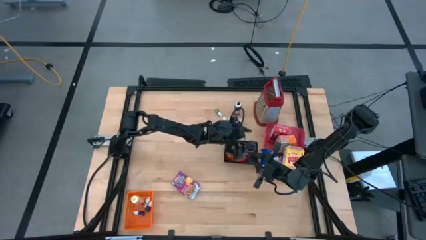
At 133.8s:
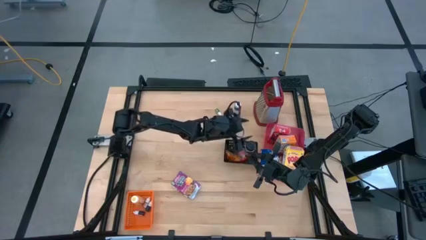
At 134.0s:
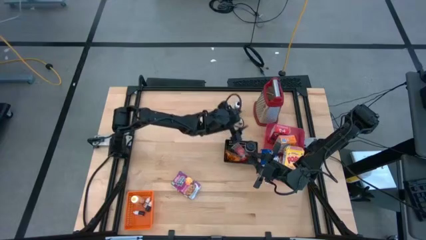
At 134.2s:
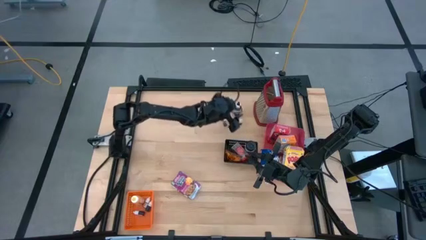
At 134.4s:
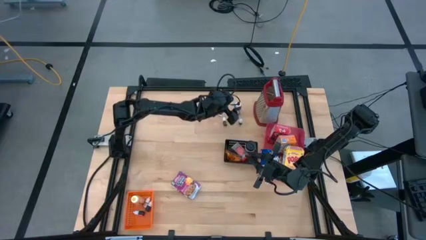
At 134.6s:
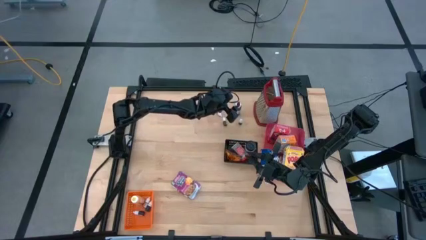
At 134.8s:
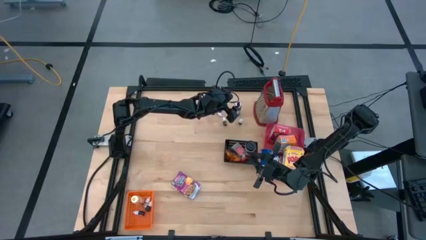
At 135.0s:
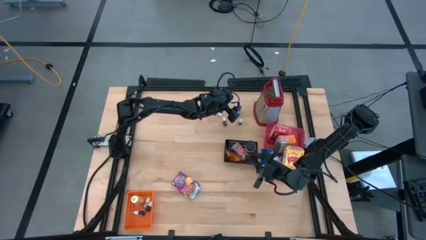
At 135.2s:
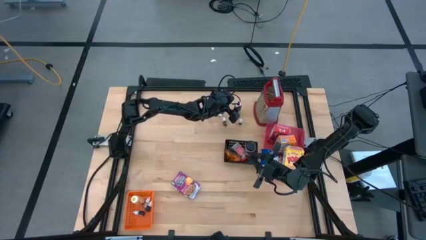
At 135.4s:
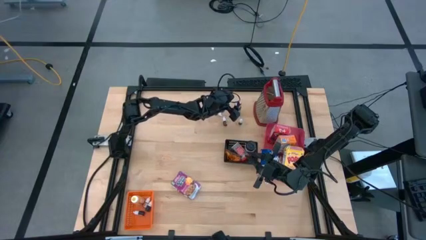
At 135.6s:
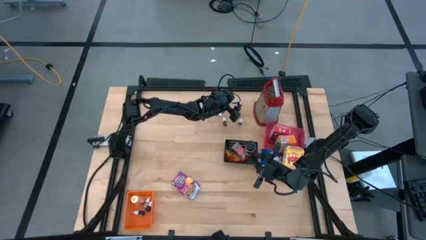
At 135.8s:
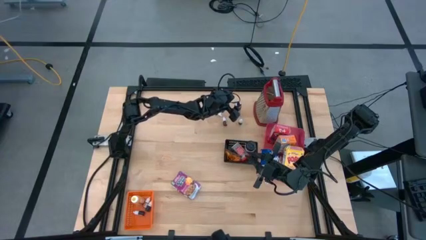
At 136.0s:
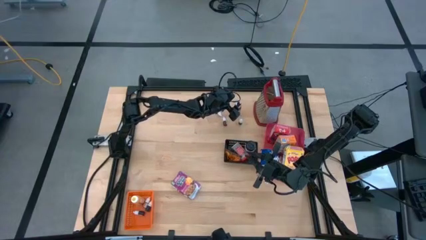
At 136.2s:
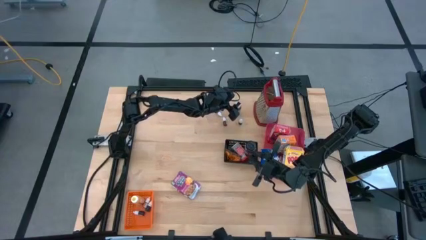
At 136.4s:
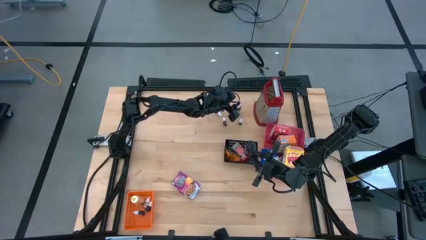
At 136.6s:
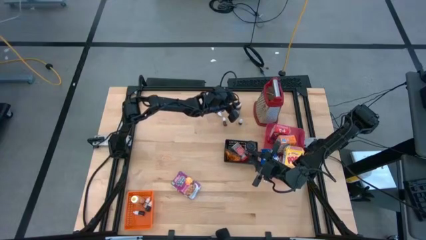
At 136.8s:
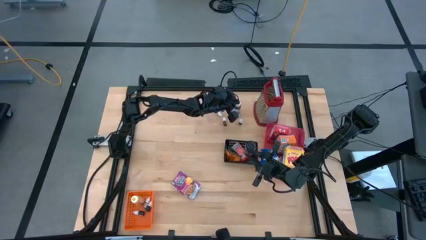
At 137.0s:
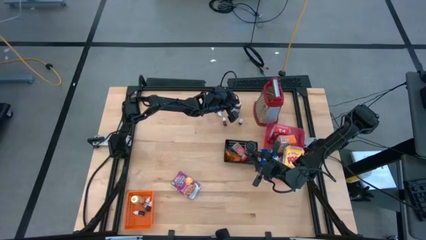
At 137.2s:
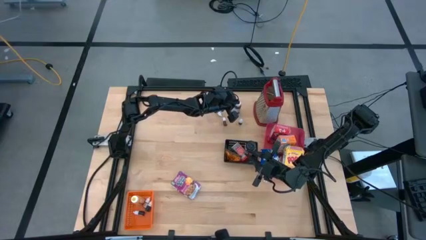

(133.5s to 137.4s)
Task: Pick & Place Kitchen Items
Put the large black food coloring bottle into the orange bin

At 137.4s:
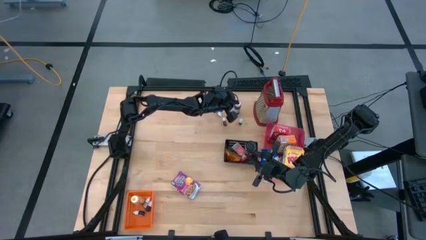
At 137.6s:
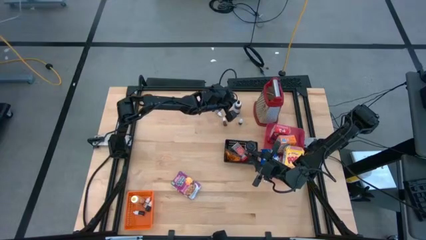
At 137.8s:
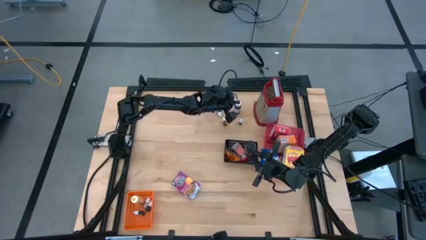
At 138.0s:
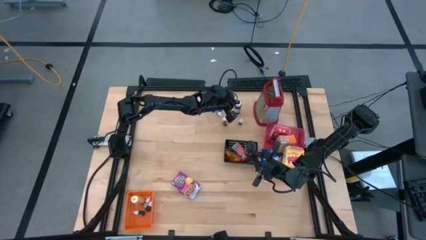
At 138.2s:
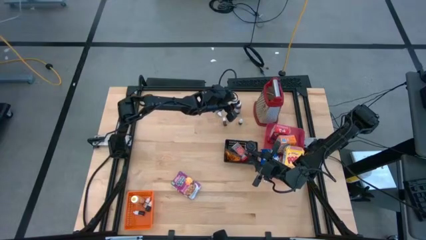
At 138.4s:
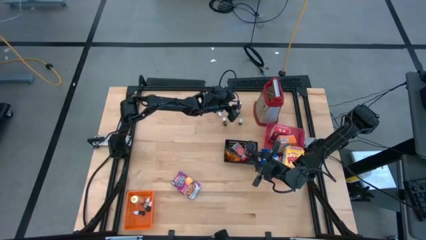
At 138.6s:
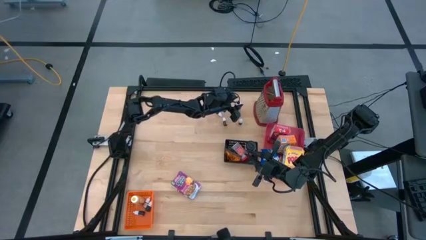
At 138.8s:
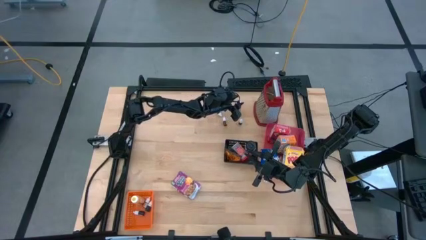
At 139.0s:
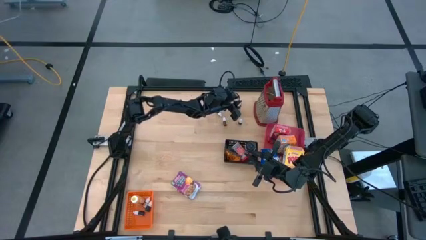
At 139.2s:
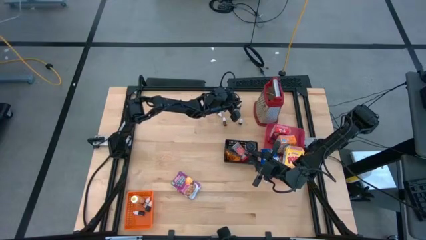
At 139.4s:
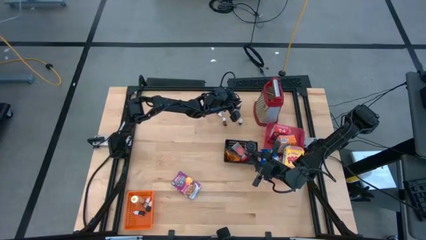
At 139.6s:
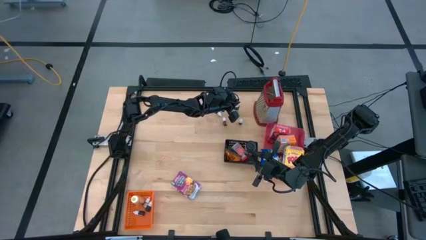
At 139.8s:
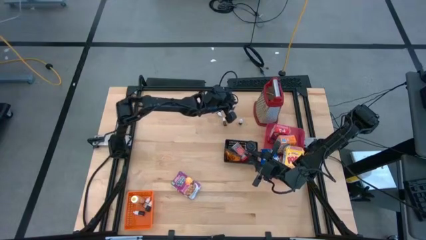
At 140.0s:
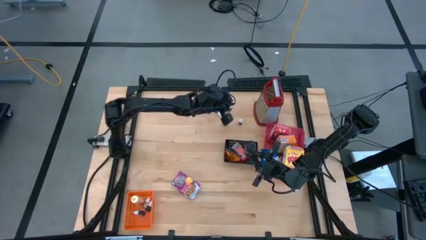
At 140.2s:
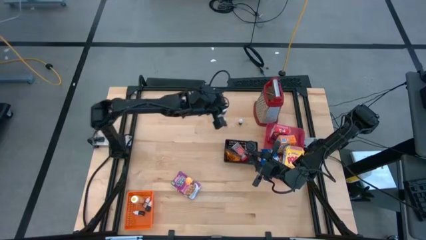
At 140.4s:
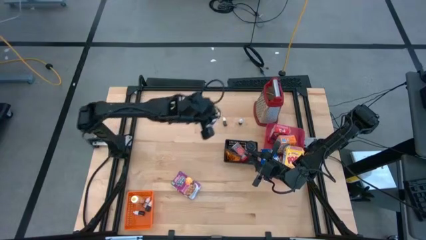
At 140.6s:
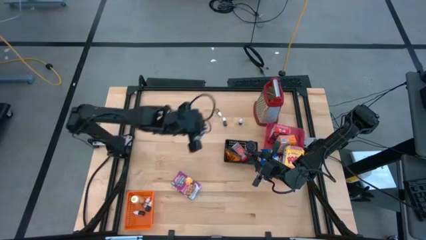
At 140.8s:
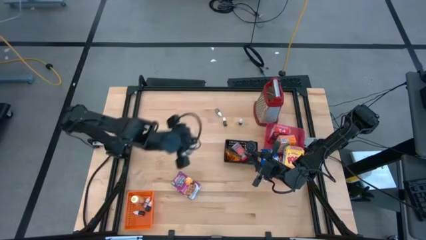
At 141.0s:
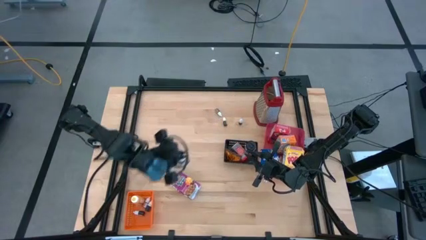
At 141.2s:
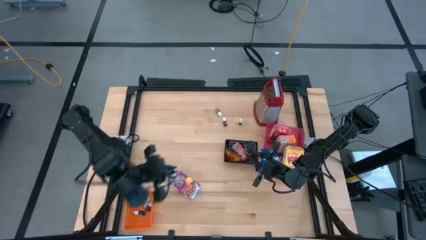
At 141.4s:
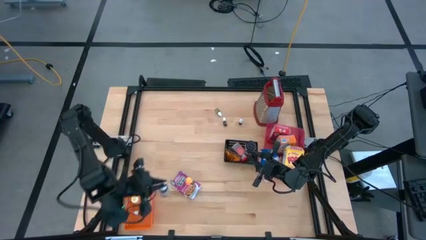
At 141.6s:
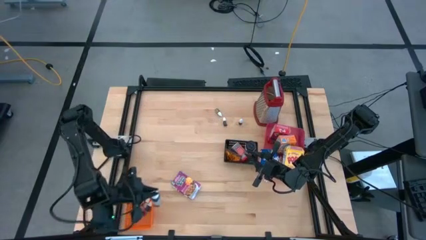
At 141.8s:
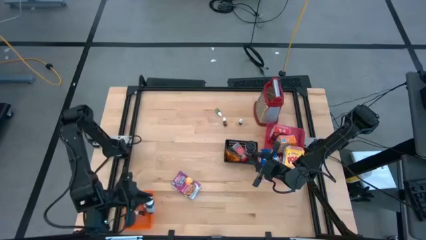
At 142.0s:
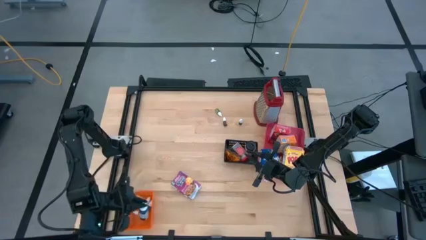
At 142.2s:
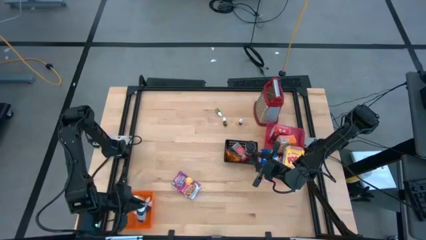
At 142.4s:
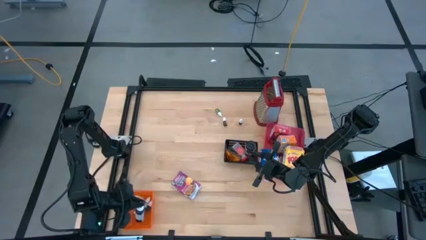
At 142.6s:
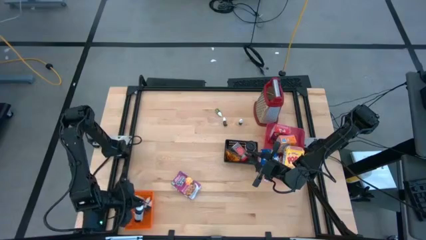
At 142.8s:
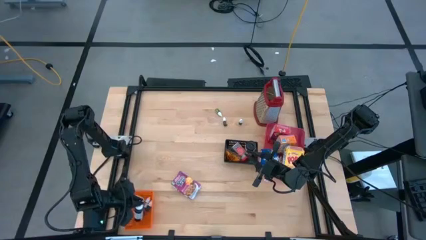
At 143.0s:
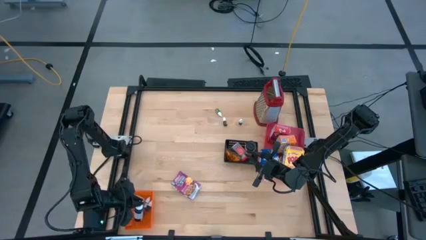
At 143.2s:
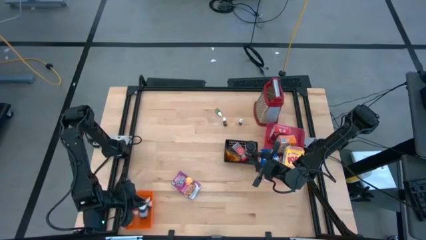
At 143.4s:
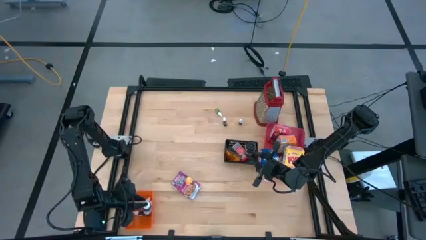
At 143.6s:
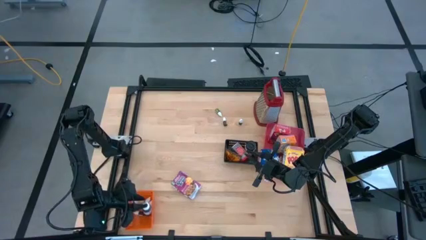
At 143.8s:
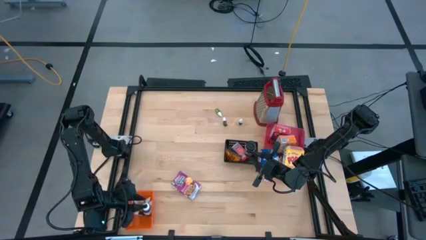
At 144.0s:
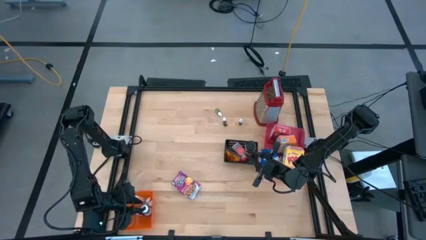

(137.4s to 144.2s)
Put the large blue food coloring bottle into the orange bin

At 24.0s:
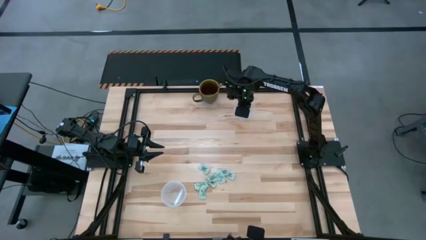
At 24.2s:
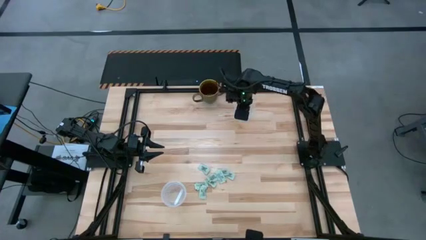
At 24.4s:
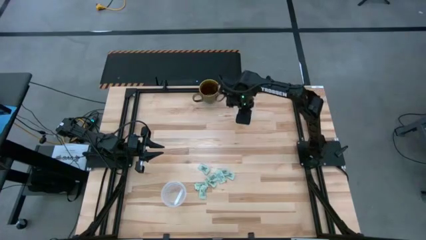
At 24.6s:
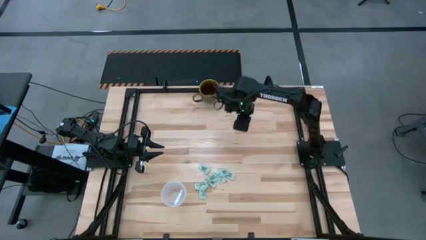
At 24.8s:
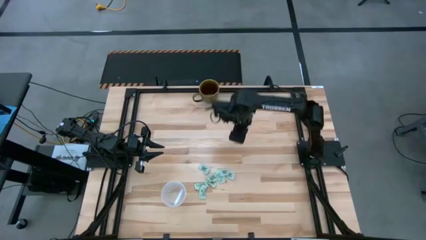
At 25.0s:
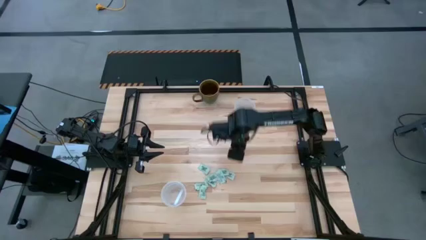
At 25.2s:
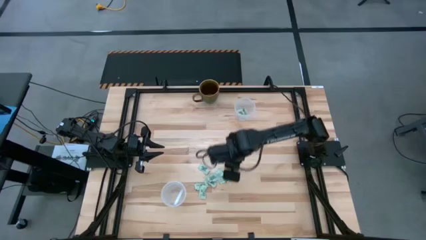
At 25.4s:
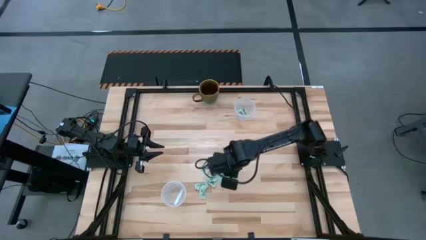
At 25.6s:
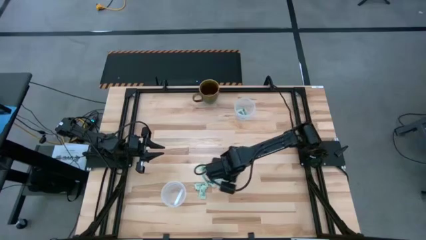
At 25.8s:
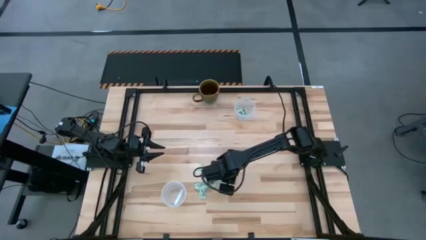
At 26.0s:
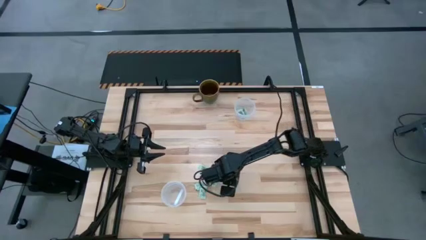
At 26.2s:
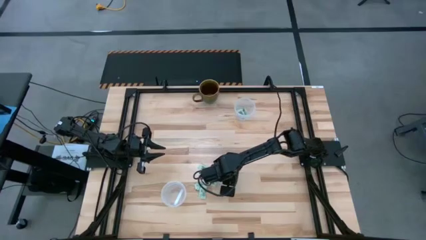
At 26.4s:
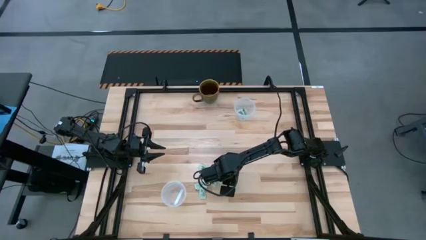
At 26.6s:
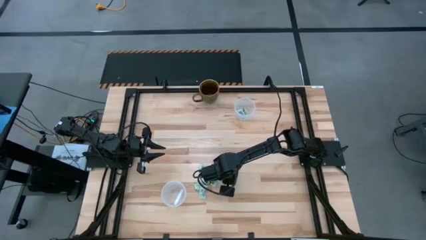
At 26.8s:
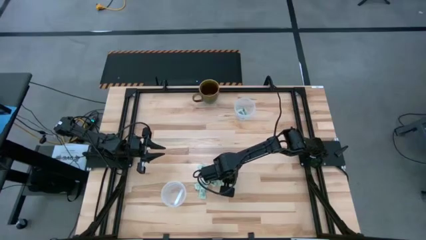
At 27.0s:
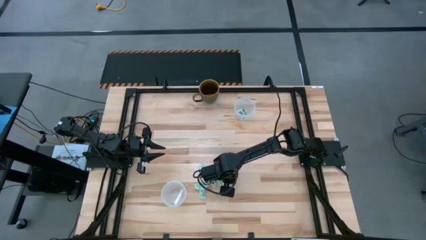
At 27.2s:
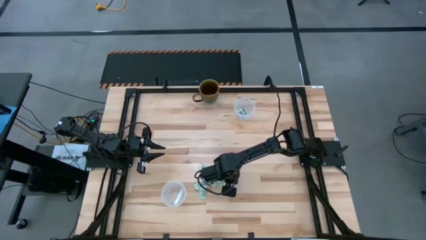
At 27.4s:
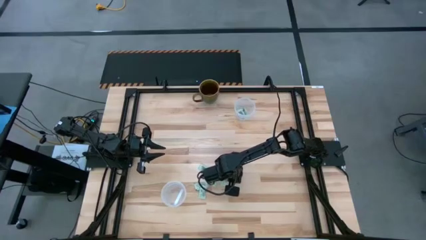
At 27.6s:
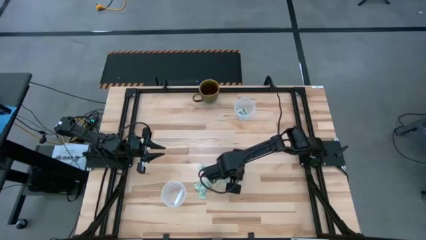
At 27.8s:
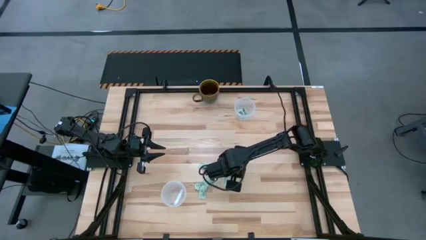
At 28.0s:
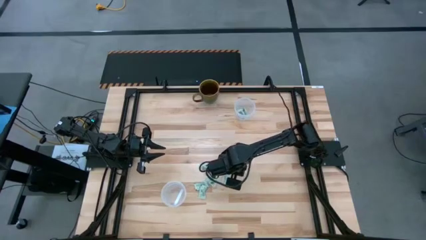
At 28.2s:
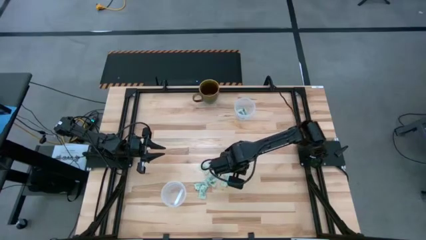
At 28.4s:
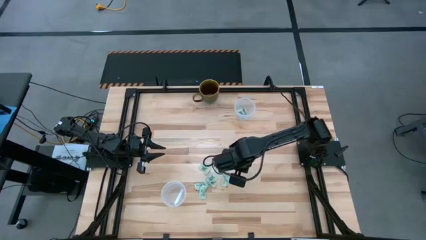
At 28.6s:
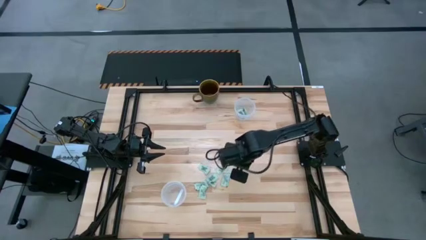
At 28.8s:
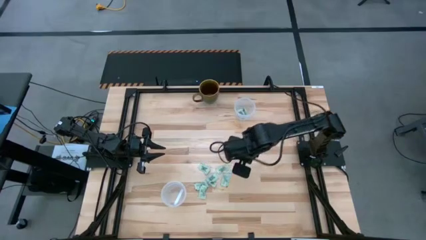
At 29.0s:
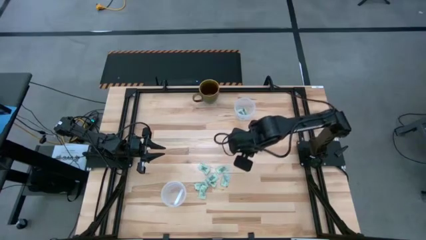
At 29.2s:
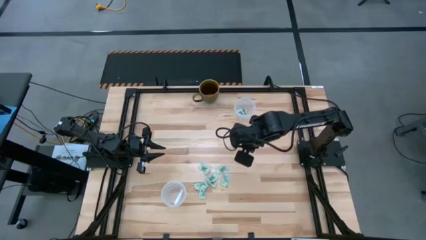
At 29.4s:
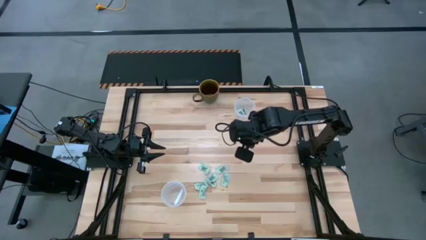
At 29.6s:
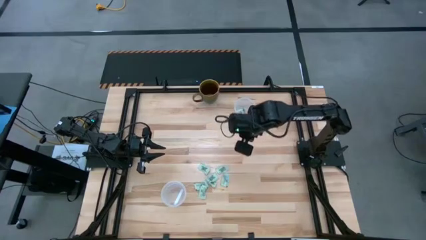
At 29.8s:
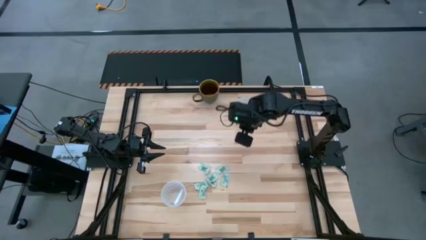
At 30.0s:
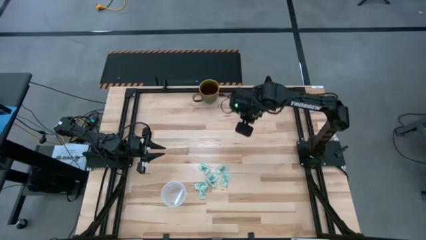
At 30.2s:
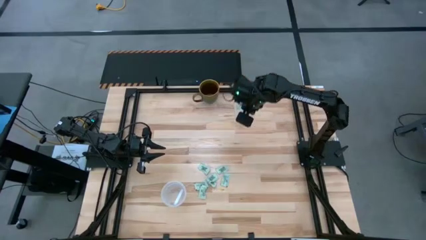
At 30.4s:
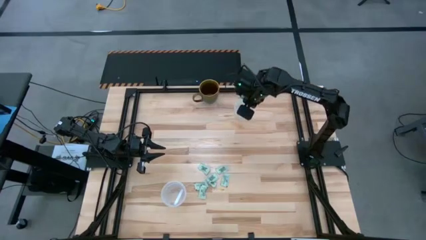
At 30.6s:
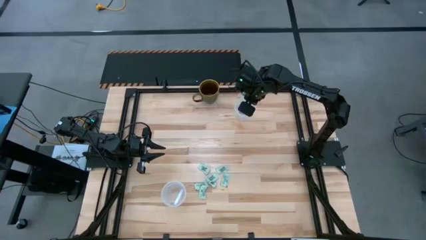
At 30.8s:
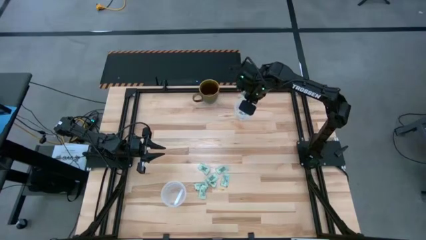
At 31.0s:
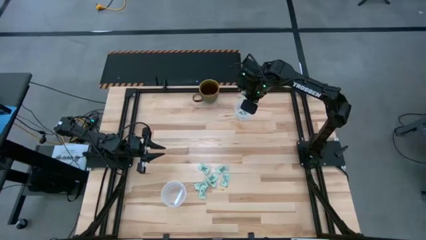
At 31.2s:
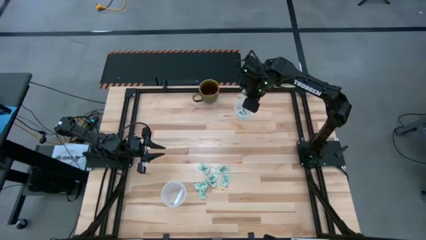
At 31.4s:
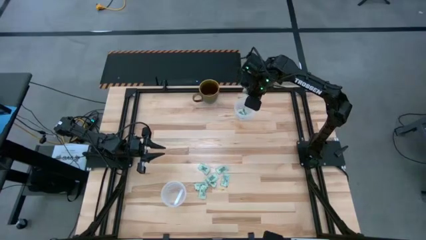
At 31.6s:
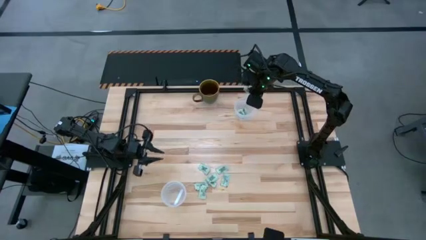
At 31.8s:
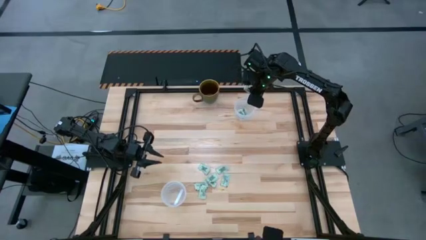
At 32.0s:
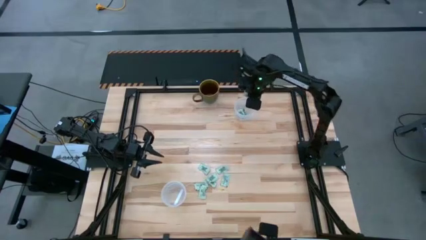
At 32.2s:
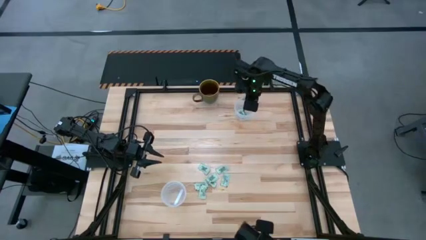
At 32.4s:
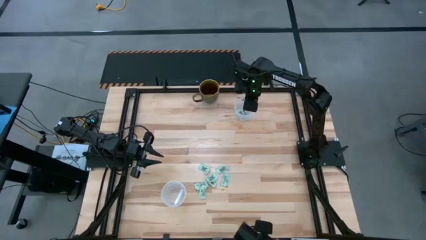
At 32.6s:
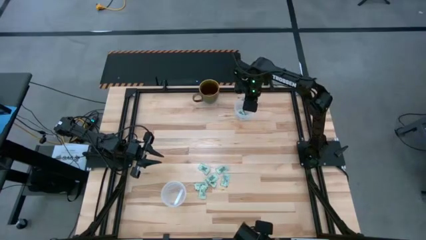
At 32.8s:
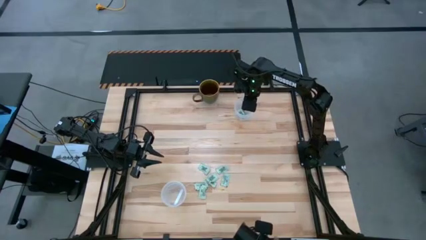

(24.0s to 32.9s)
Task: Pick and place items into bin
Put the stevia packet into the top transparent bin
